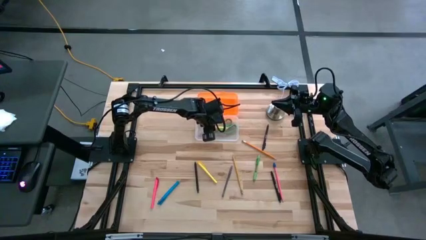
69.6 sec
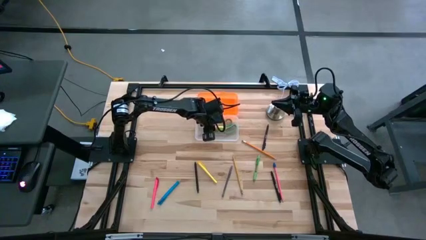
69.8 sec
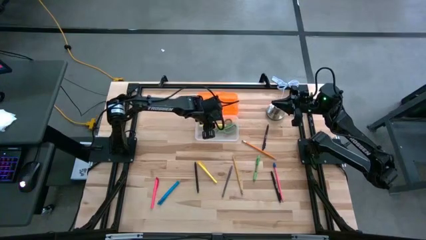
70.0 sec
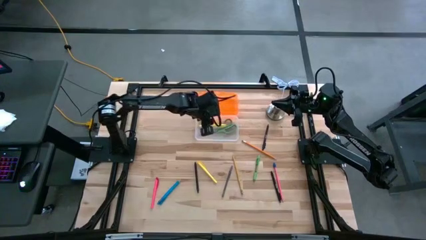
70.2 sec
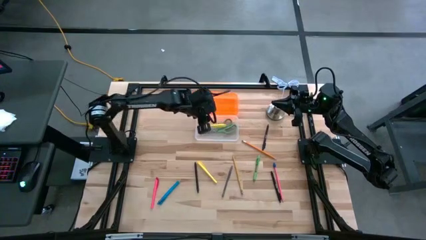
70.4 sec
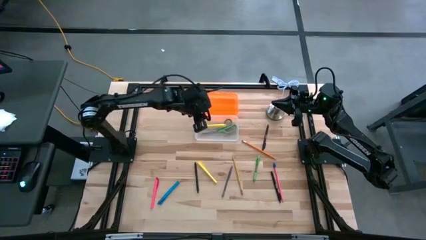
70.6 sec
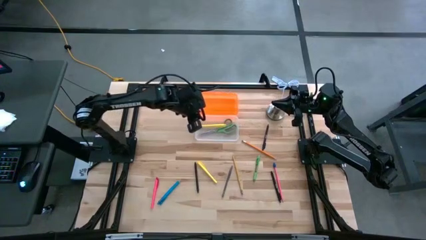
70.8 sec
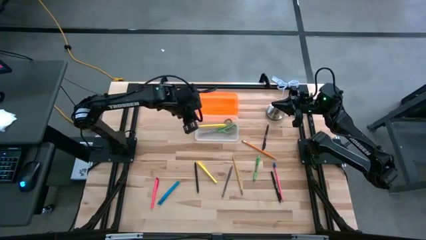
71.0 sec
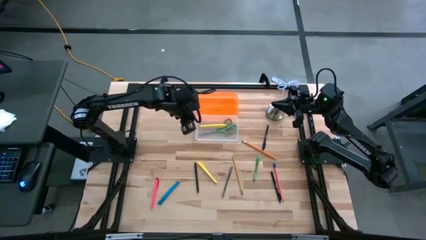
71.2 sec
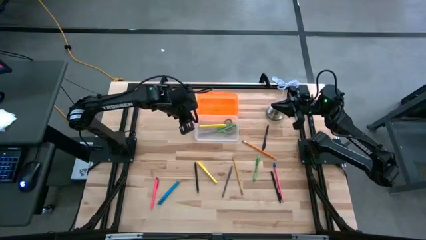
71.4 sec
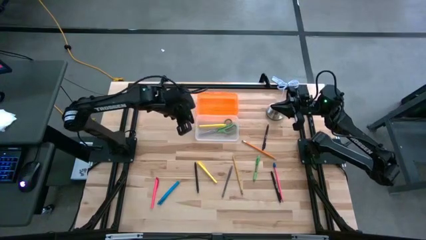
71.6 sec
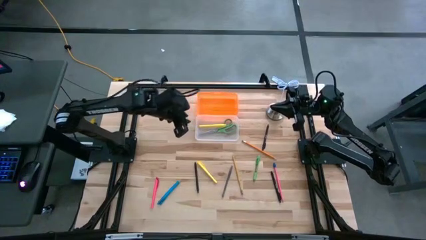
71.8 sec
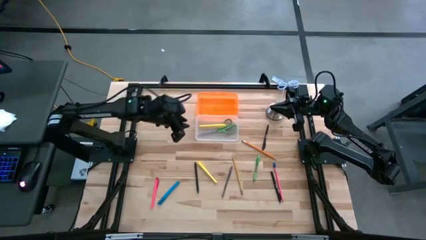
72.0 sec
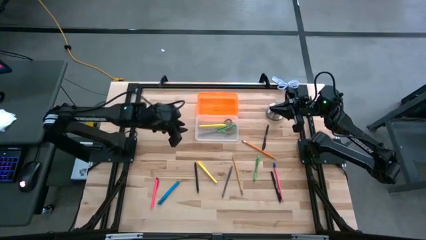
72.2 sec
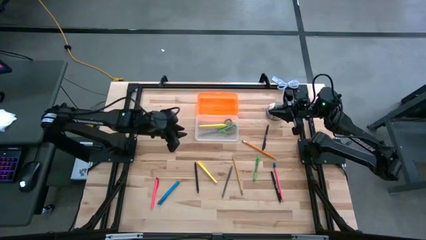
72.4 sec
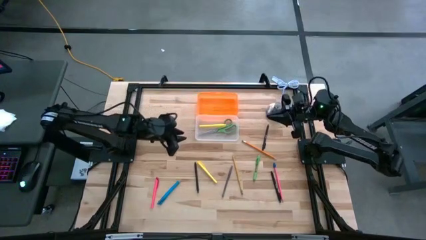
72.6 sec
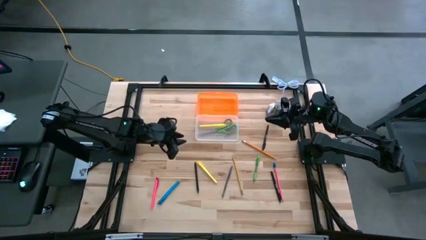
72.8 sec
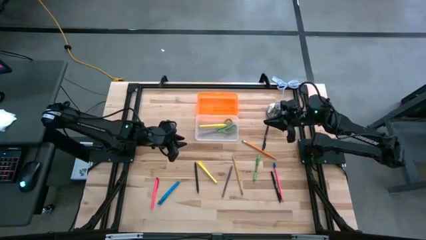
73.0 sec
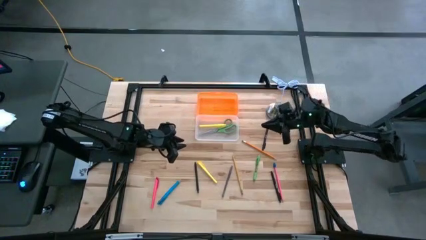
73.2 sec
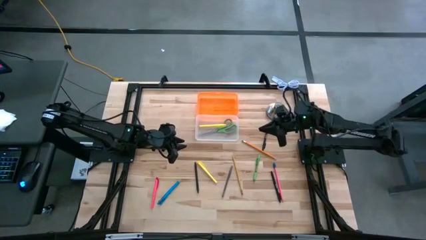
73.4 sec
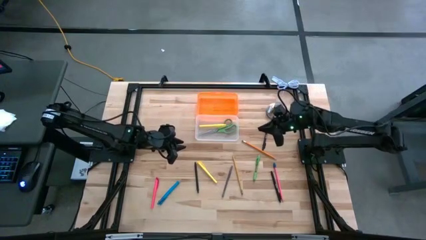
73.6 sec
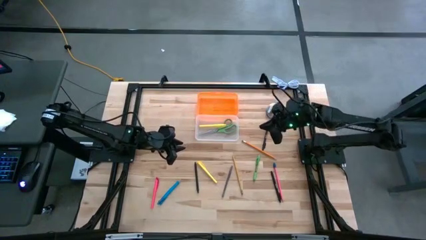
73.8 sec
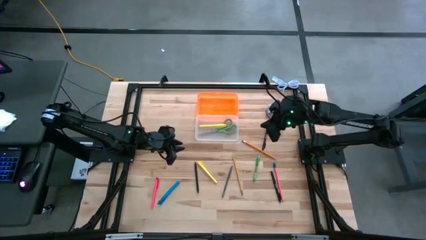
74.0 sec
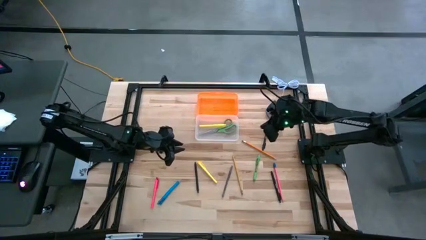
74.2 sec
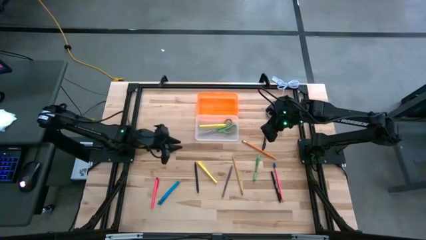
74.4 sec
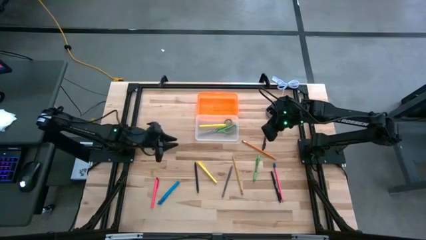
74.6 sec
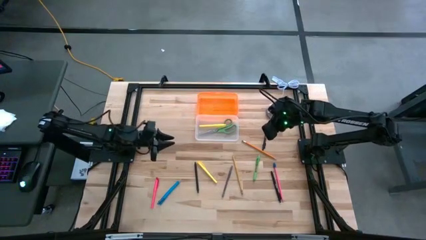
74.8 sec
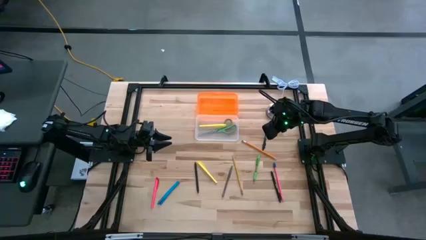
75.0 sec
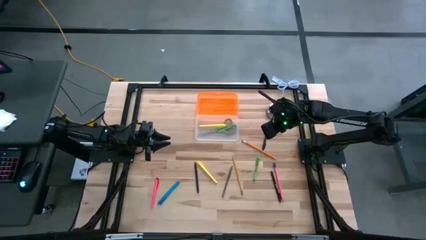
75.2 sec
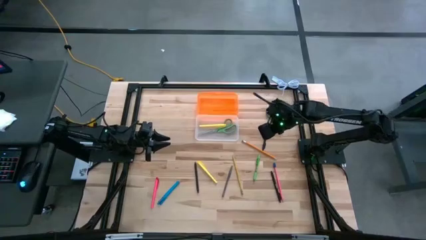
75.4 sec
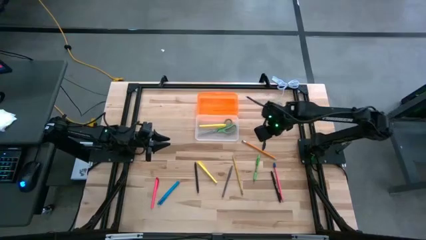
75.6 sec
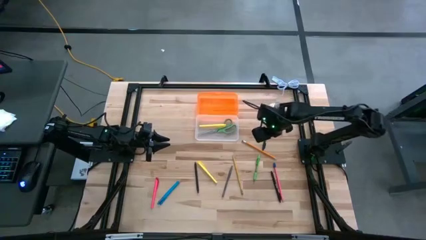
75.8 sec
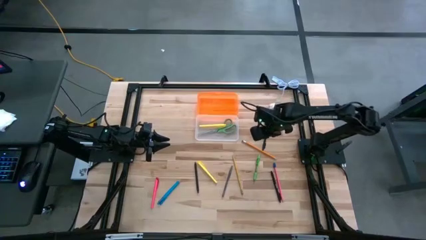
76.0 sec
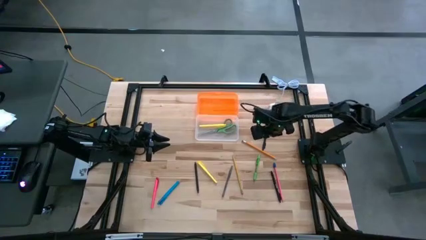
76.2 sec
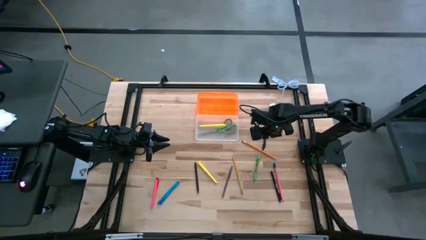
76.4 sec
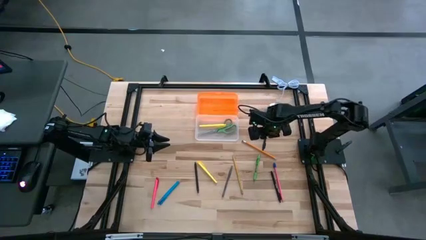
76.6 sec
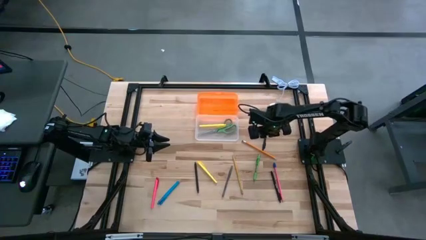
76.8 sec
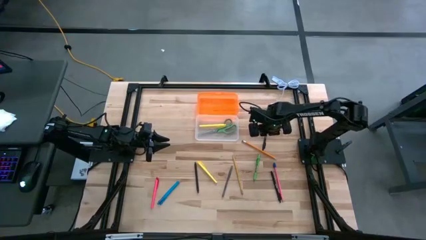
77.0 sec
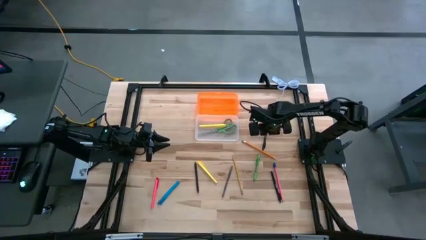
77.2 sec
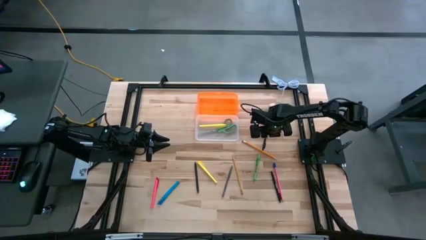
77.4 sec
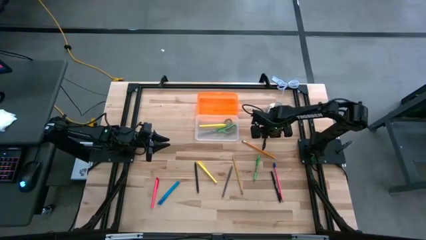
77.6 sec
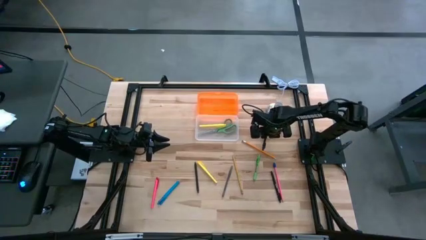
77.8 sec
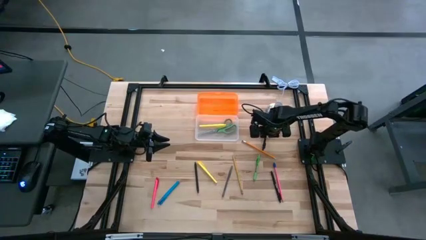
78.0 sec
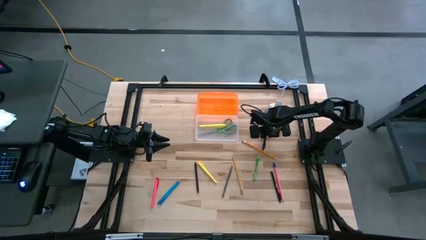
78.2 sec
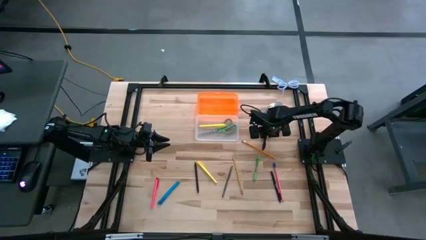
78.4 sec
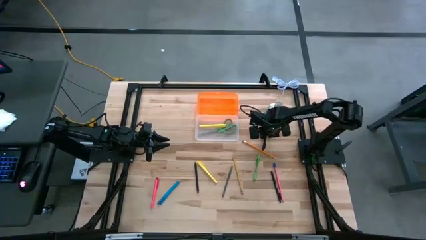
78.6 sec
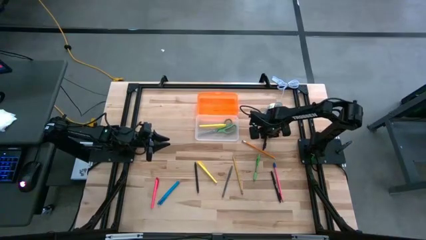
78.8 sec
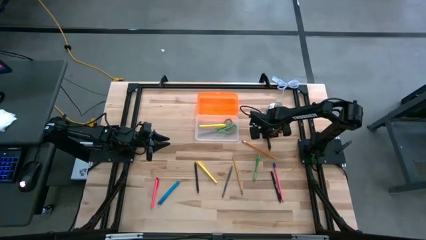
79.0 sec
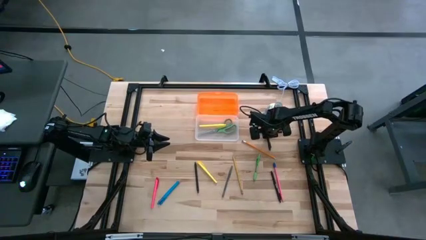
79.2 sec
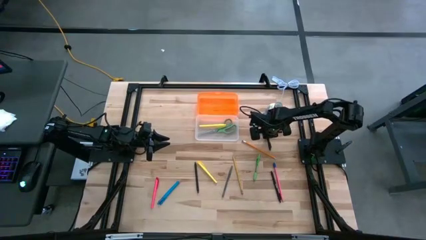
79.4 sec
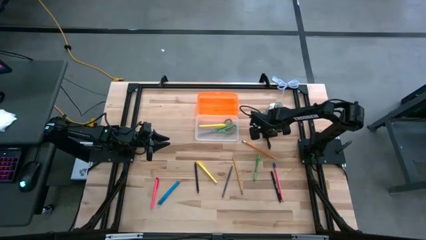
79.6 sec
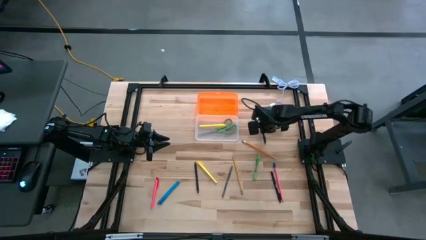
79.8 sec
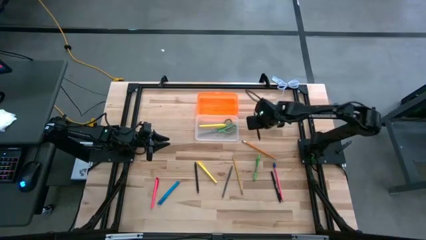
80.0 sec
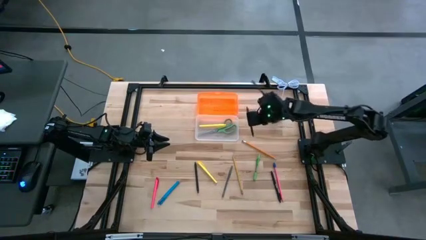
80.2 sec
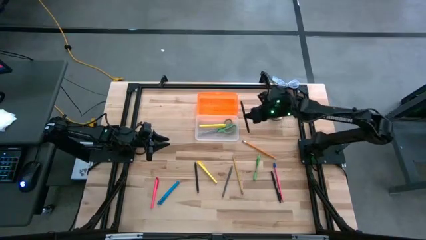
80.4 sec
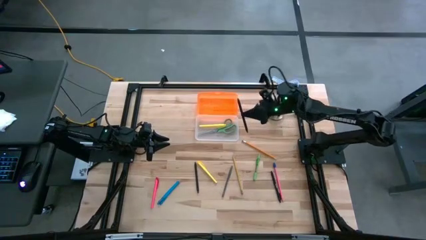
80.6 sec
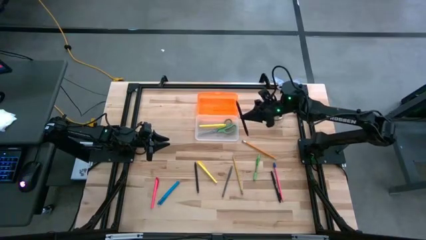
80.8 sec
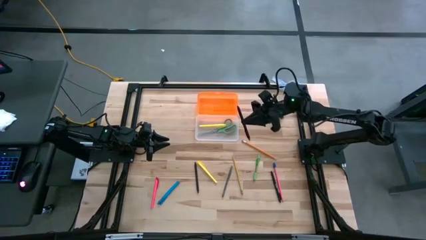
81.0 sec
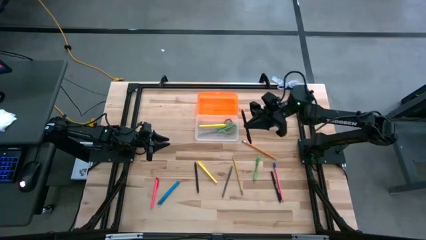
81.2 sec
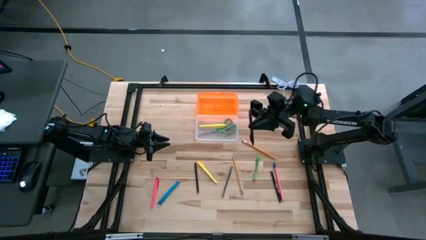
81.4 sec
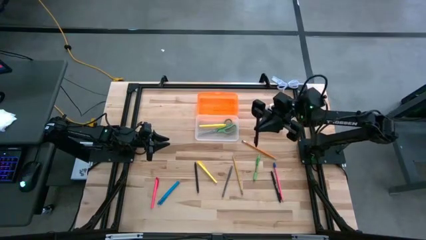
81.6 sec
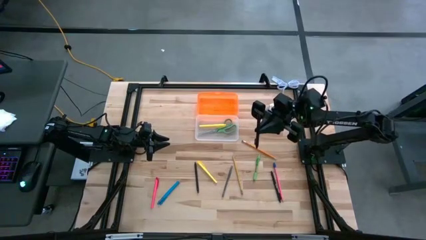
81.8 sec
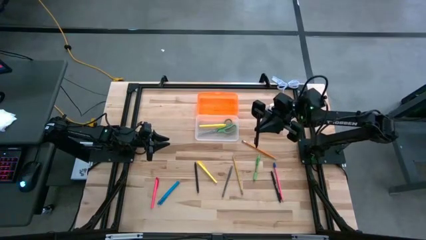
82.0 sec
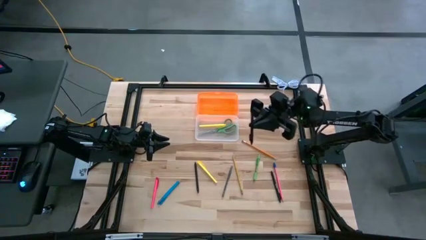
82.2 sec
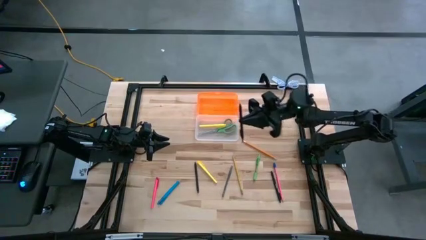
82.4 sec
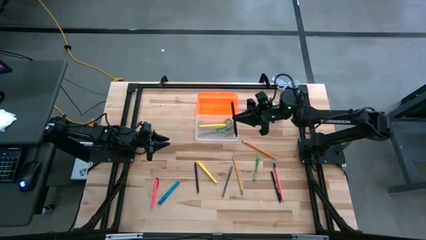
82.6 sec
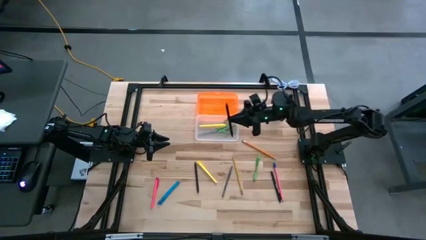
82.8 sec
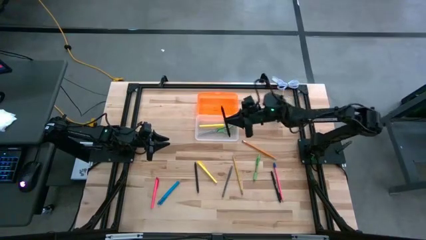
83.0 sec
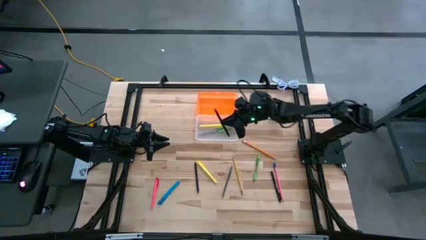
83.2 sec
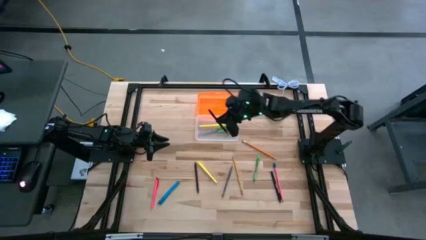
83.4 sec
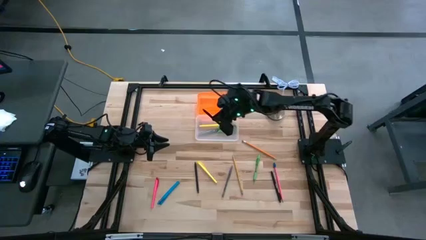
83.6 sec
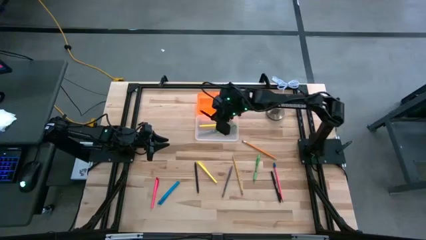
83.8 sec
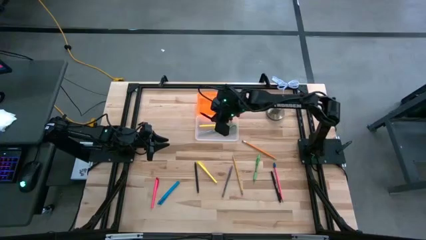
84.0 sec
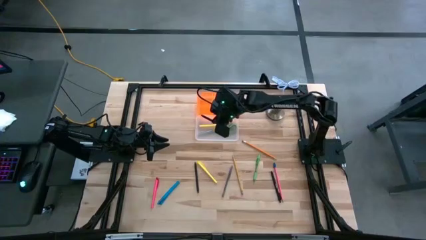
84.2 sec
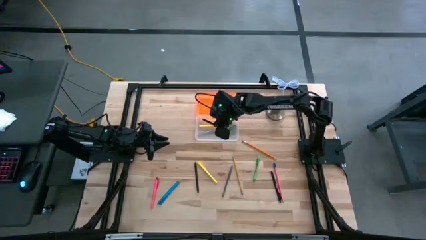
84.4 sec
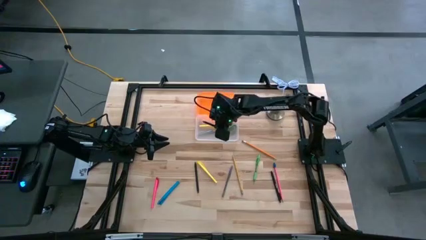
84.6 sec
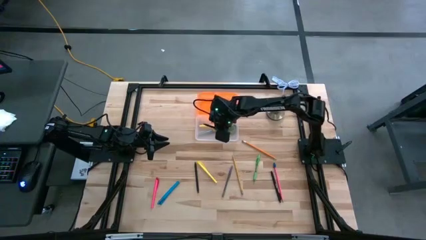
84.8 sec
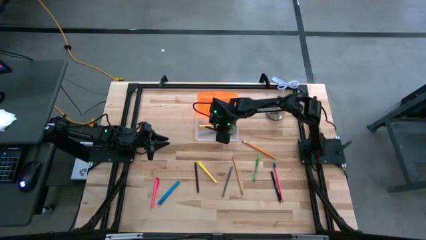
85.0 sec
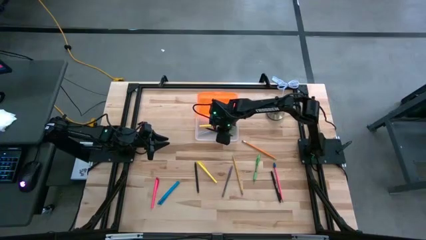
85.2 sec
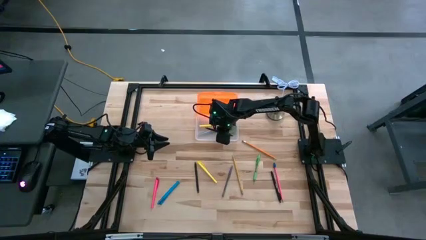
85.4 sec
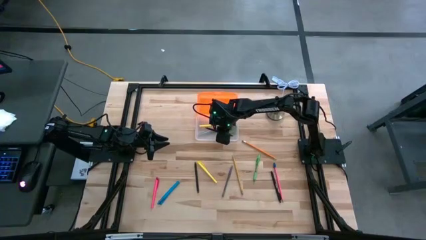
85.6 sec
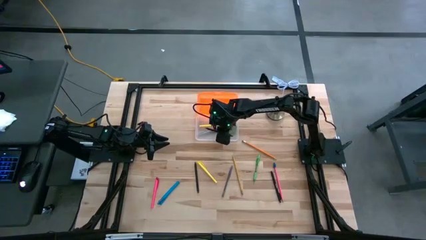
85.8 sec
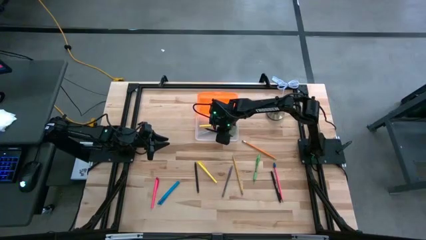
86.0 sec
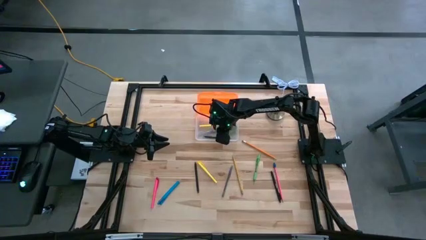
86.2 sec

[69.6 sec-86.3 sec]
Task: Pick & place school supplies into a supply box
Put the top black pen into the orange supply box
